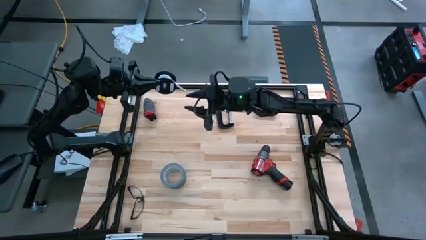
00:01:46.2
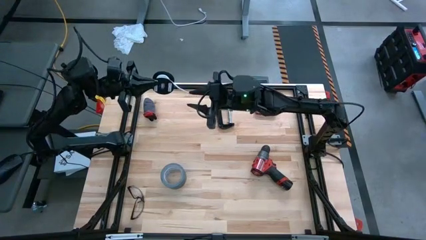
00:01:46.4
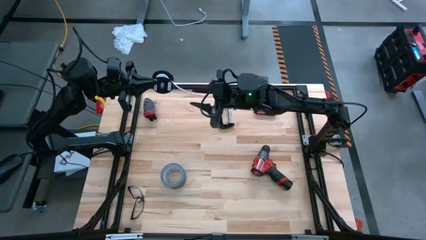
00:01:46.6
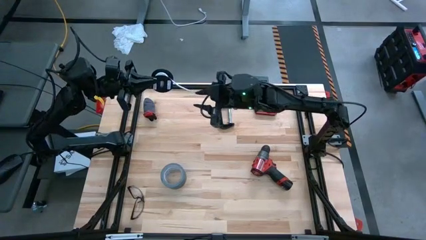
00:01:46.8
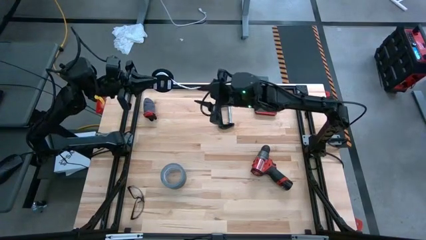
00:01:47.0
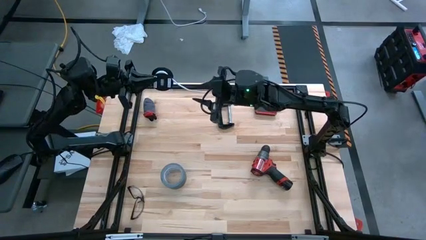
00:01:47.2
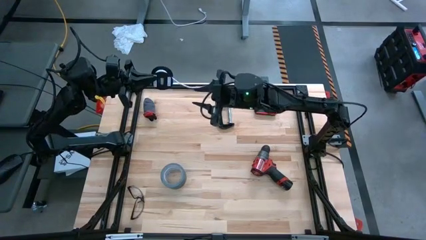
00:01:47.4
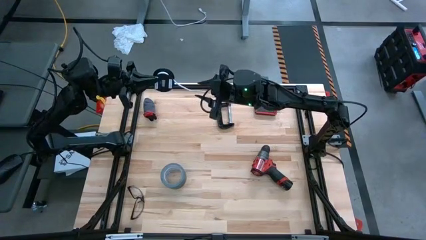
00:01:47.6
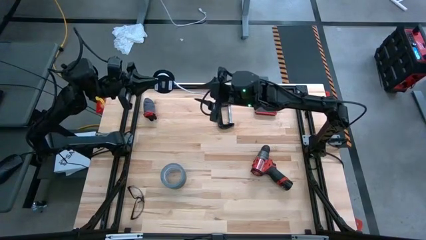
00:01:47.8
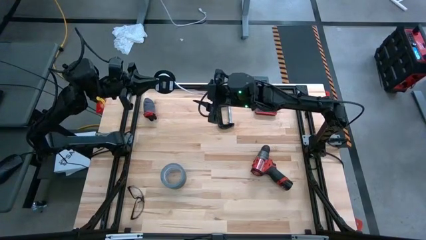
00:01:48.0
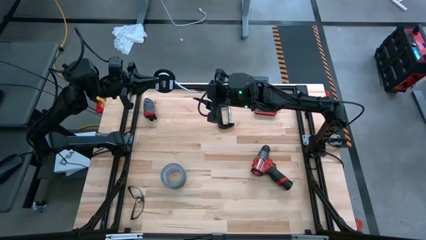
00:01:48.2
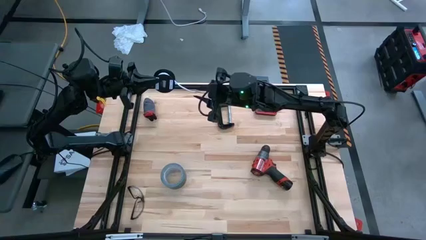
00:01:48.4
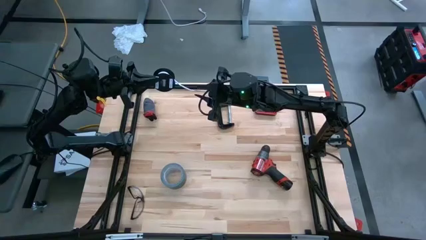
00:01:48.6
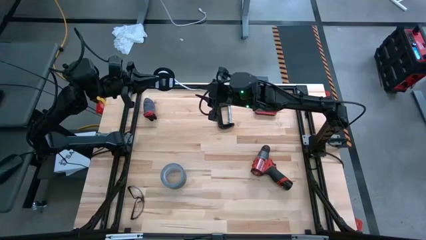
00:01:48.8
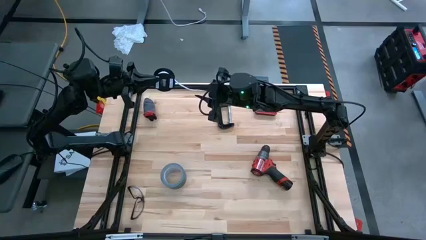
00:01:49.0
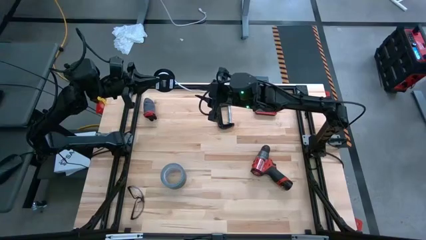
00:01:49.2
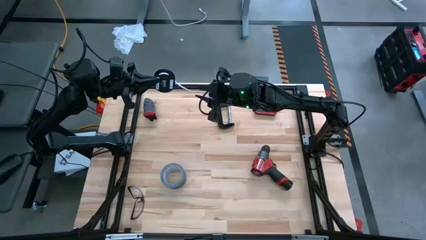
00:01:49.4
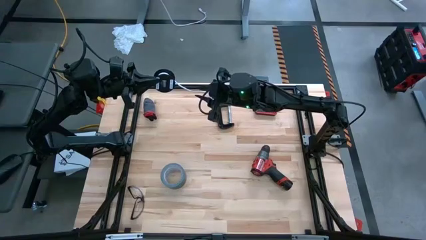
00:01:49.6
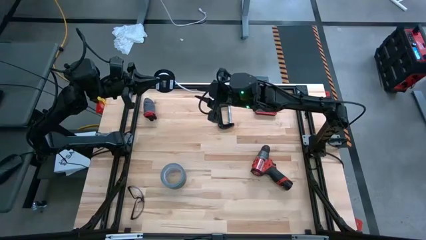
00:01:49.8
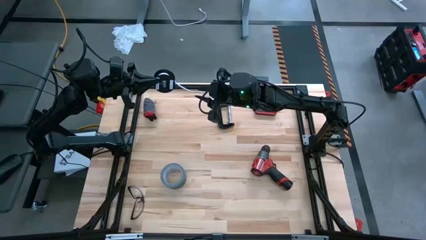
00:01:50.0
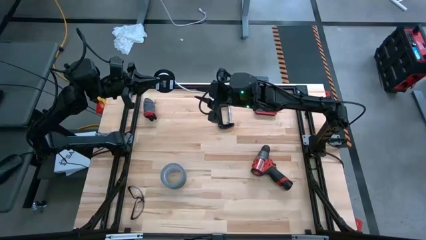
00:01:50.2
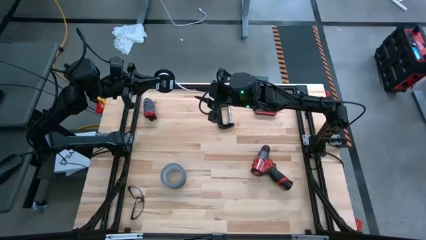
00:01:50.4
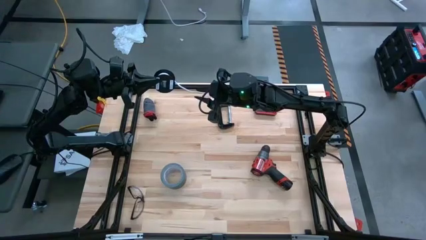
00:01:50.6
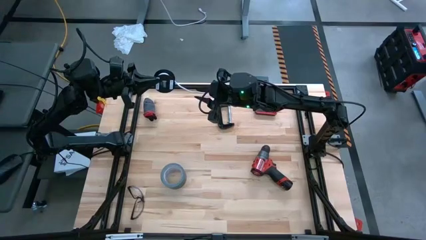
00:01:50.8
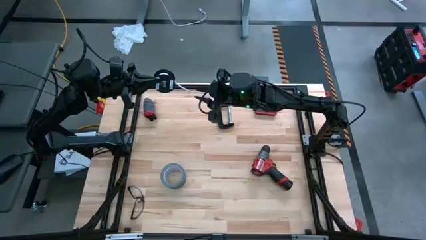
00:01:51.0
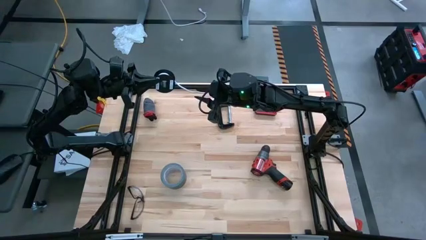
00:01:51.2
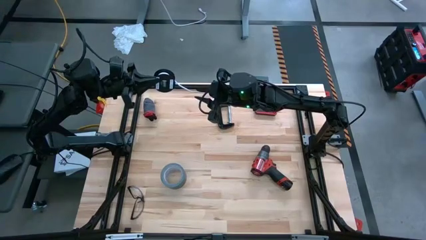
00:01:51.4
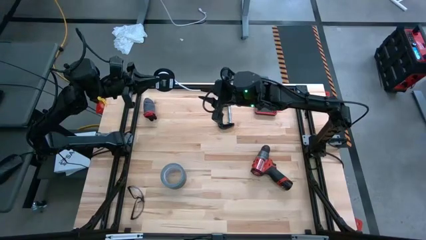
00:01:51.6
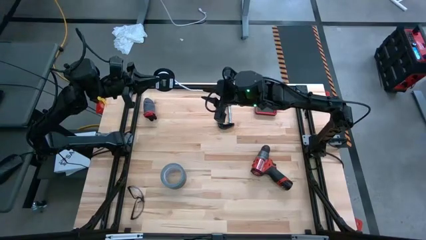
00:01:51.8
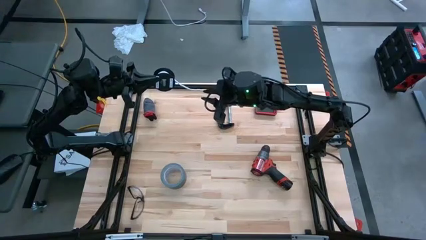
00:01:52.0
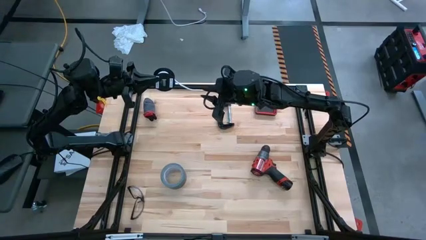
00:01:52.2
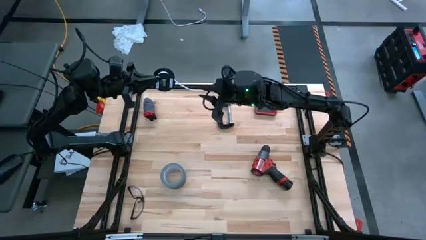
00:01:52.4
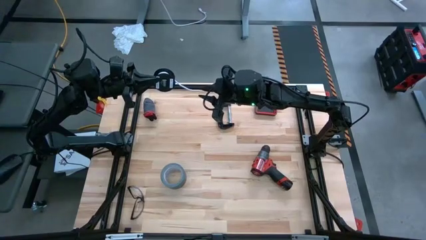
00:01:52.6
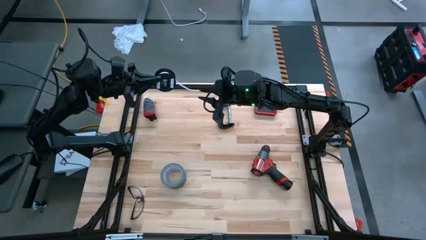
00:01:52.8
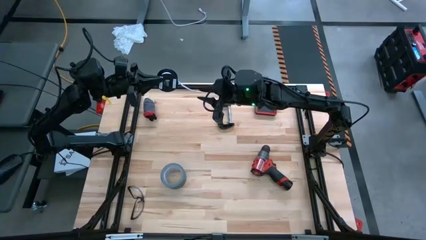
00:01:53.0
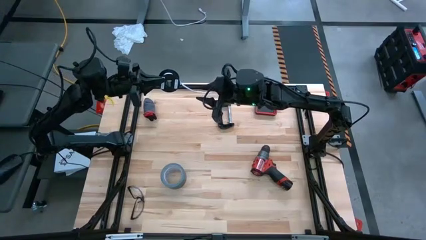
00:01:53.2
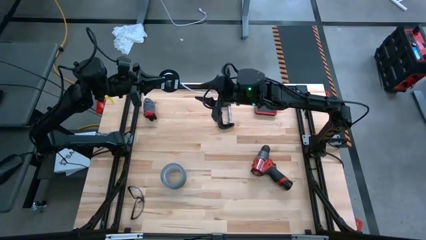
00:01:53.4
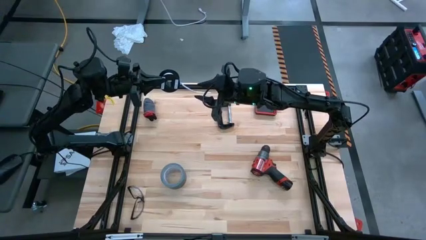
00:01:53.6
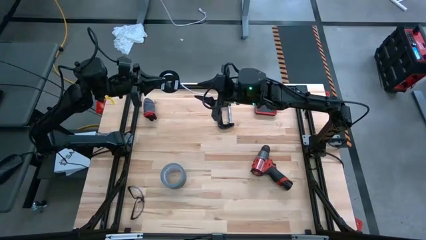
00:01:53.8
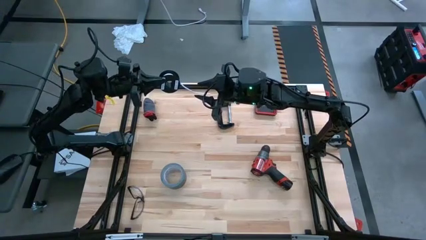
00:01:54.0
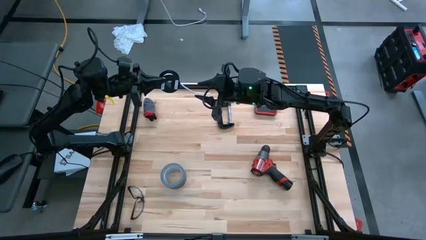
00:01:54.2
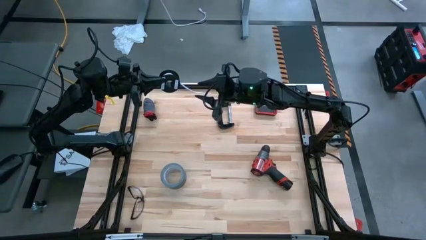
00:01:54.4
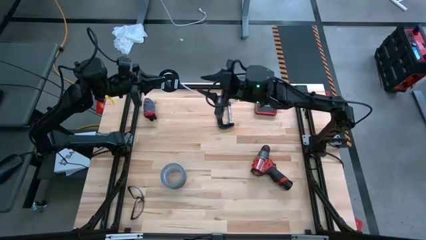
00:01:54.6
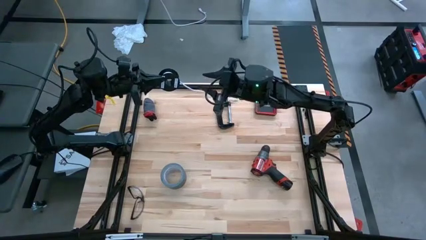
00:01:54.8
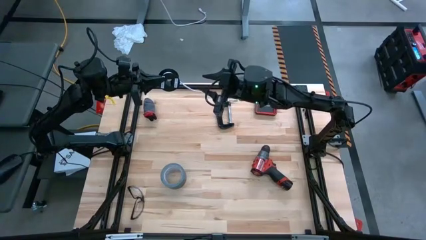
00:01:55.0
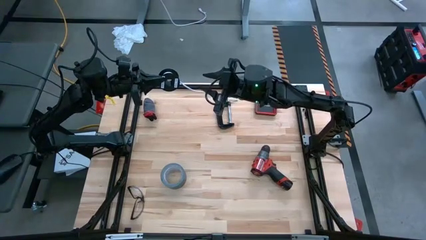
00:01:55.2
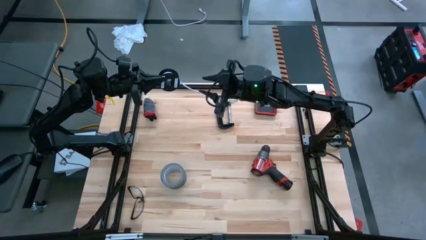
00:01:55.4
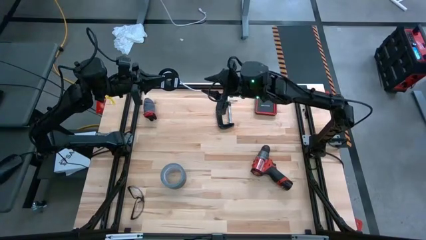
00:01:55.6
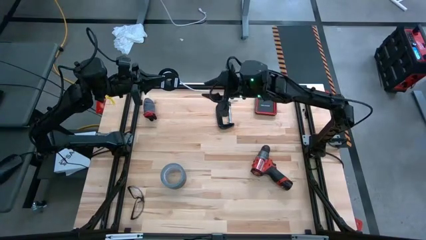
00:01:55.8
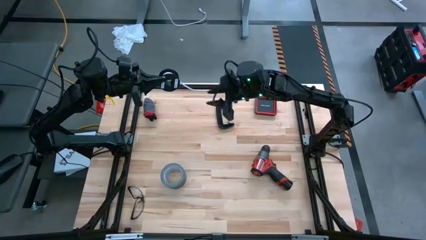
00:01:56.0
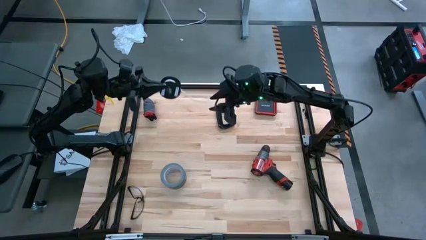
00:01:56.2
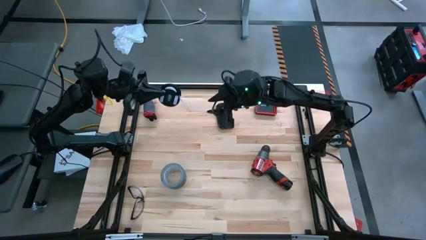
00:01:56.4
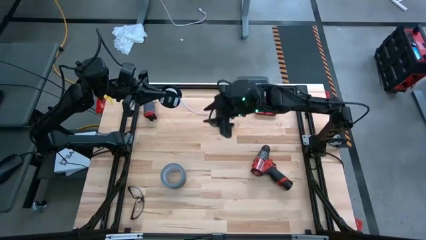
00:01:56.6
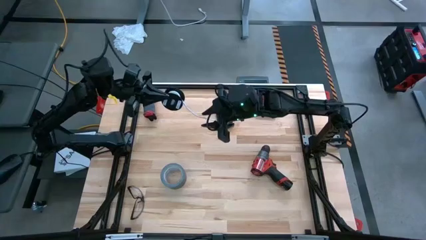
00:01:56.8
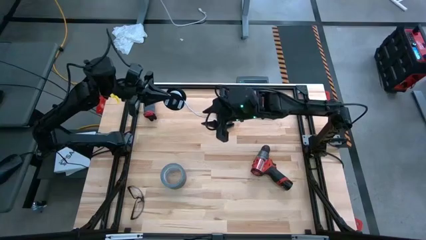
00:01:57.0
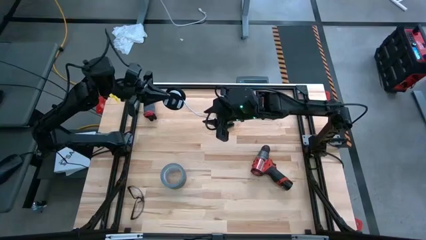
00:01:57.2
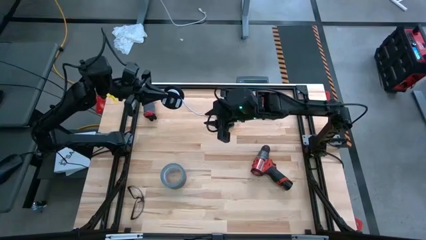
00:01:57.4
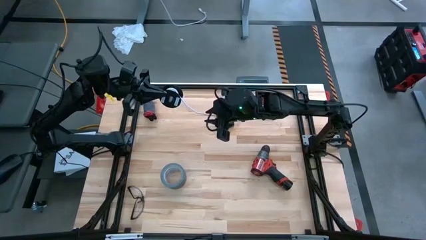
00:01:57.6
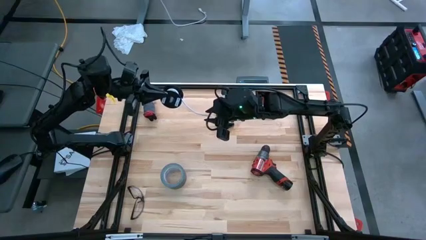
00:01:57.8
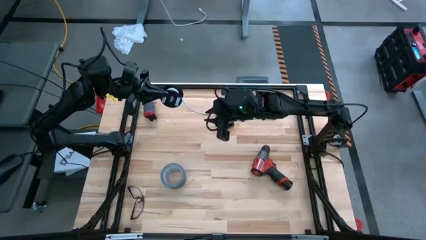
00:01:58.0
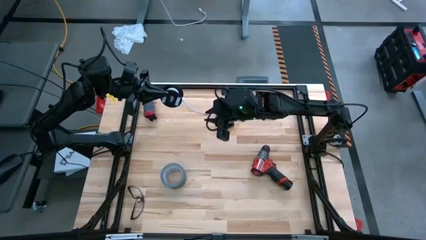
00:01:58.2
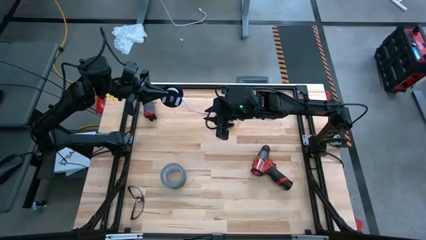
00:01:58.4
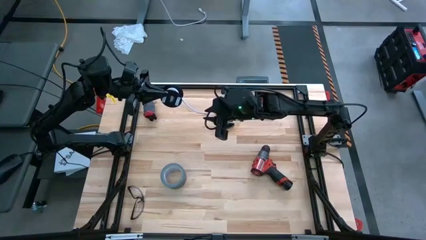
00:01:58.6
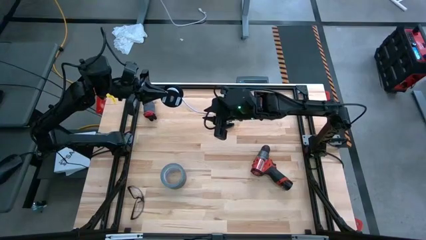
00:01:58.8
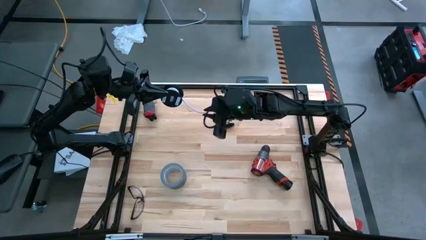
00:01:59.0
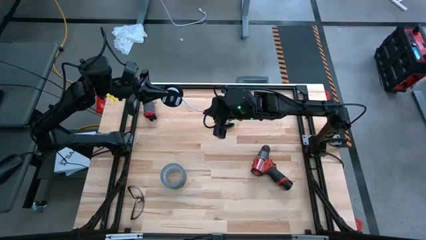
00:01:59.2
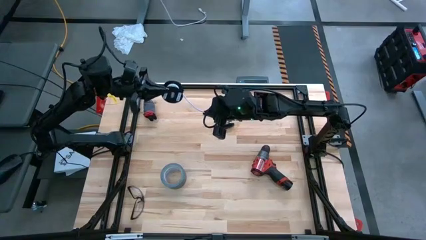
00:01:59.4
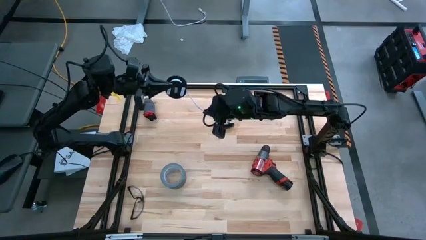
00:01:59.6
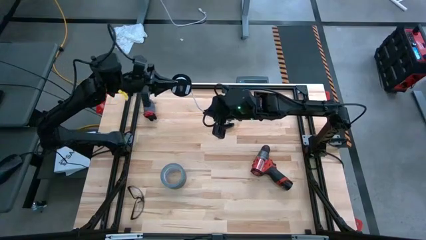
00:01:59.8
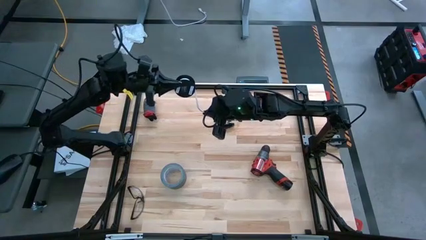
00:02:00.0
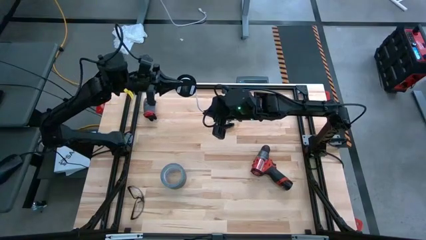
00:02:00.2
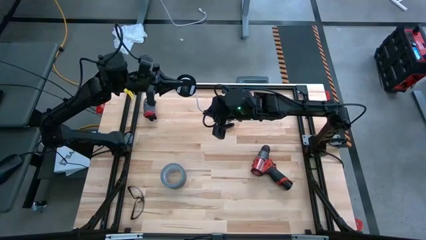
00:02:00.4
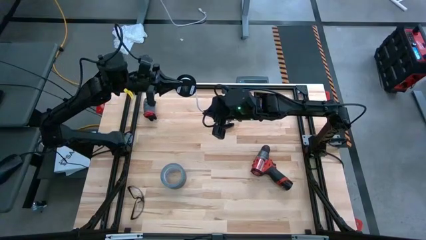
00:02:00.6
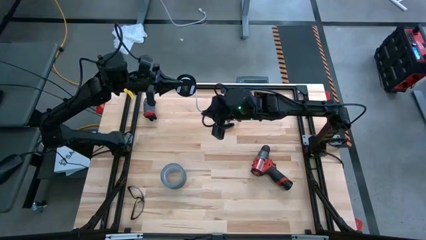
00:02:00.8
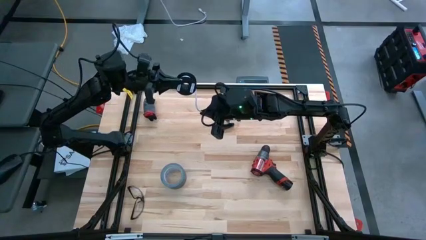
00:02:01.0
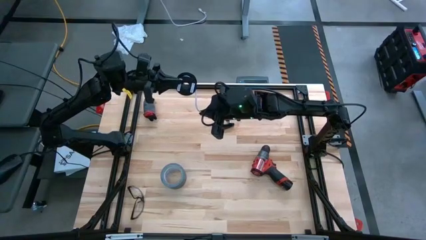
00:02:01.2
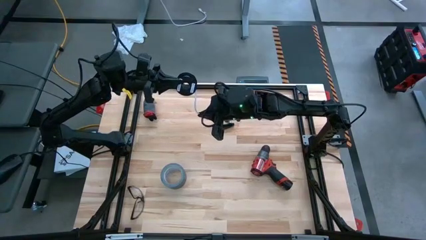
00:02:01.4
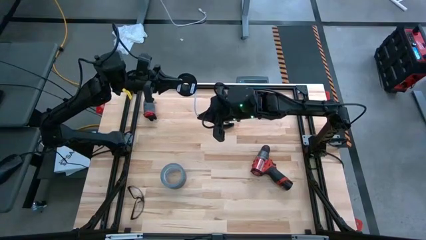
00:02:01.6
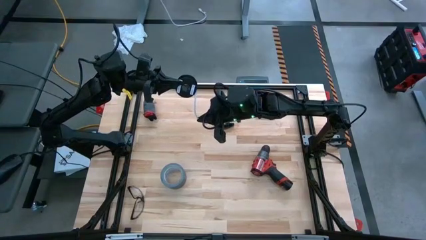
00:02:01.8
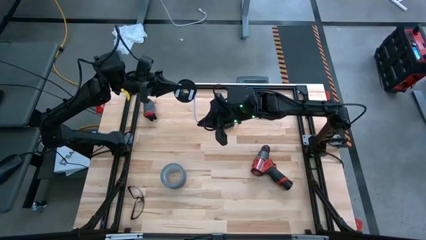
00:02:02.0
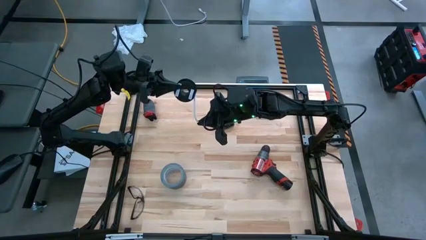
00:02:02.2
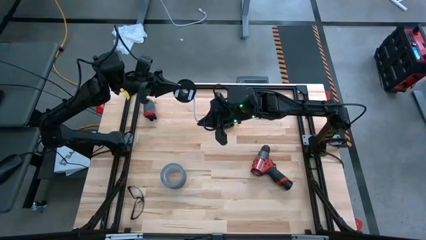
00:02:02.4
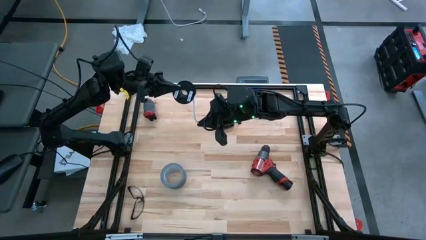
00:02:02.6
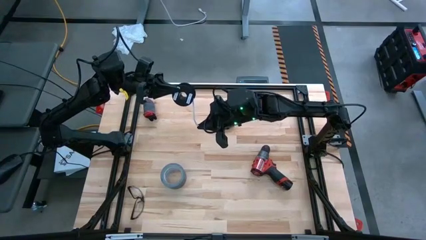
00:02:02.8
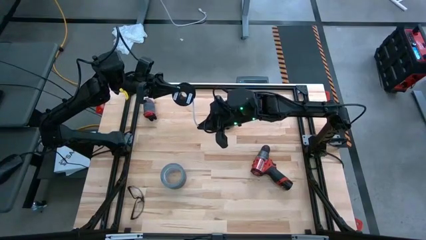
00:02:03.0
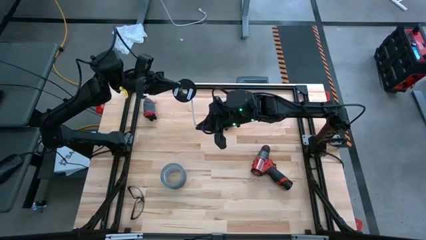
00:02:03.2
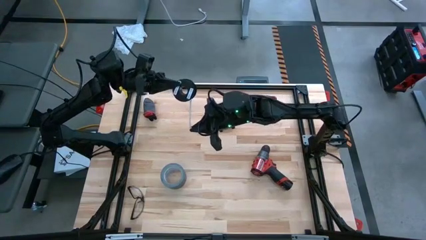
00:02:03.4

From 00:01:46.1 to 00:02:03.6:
Task: Coil cords
Coil the white wire onto the black spool
